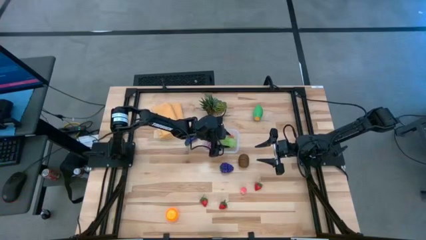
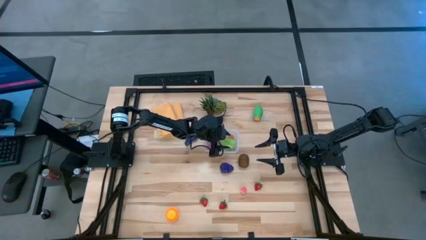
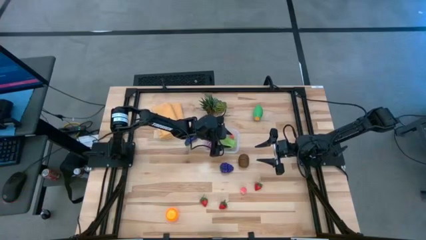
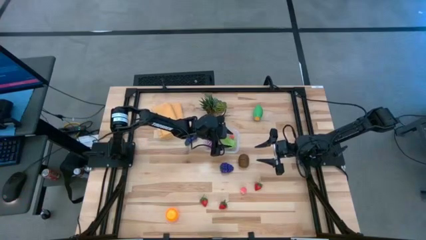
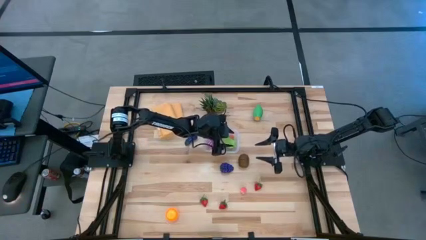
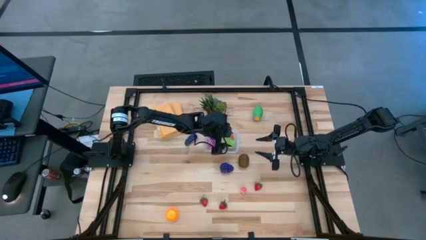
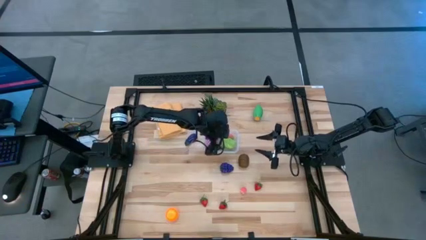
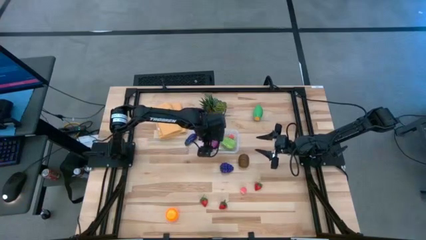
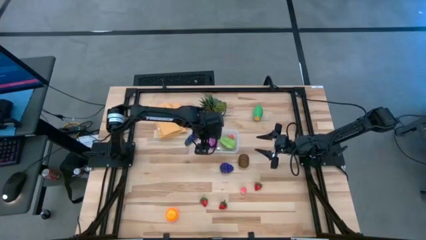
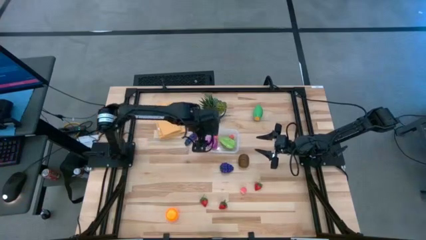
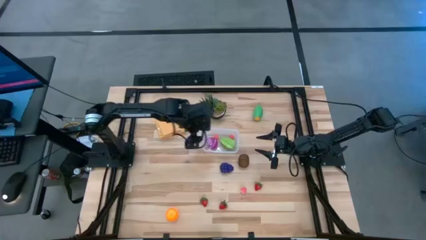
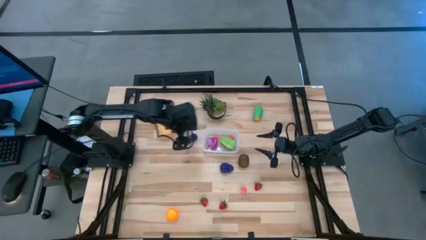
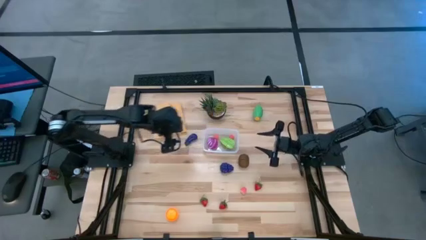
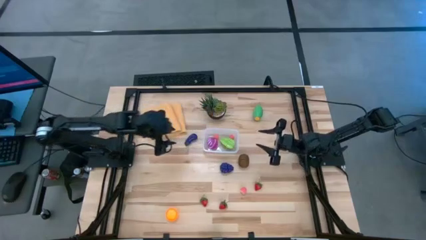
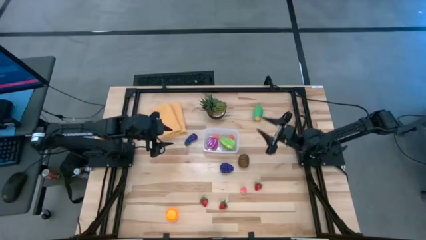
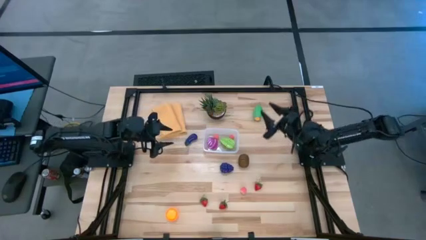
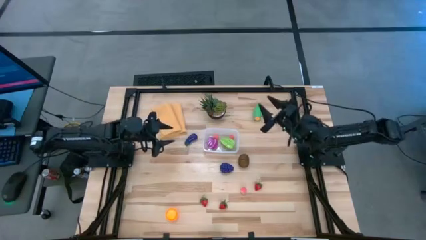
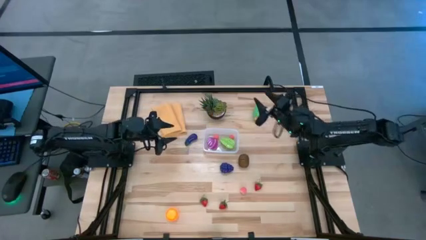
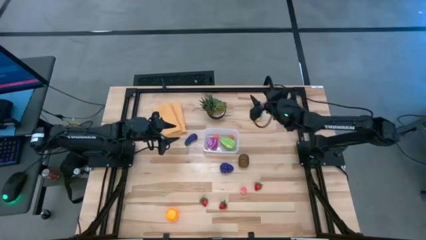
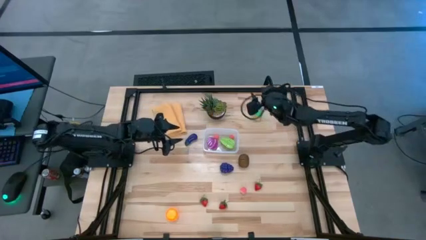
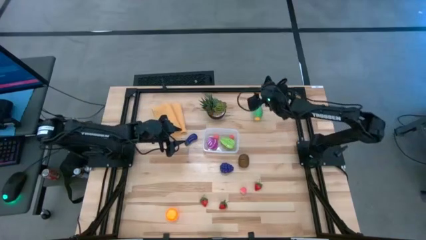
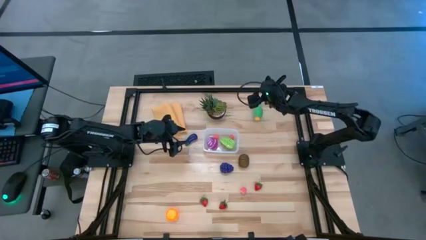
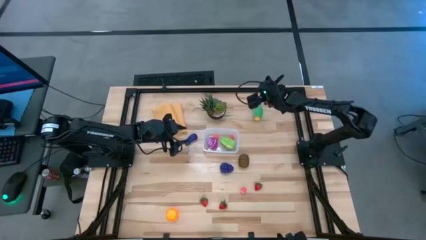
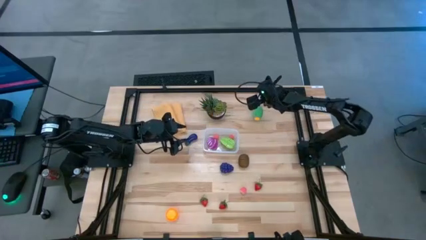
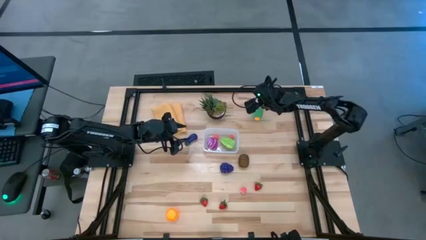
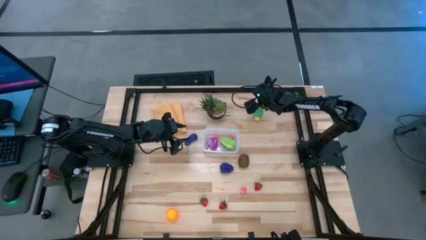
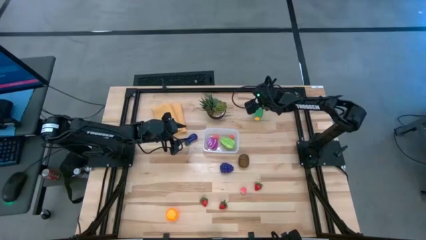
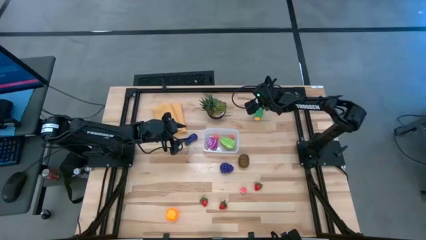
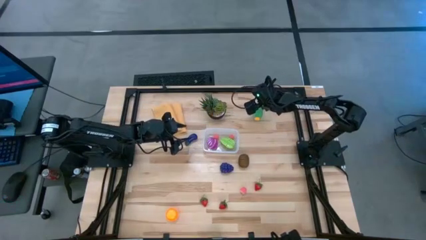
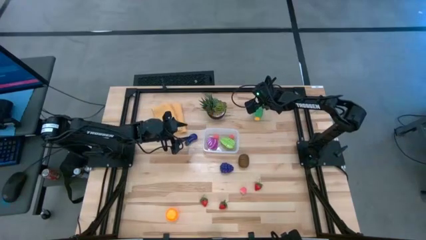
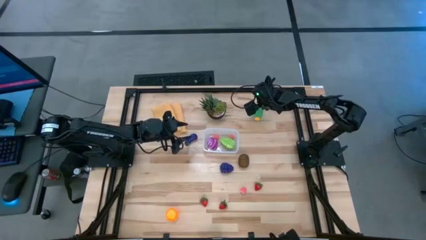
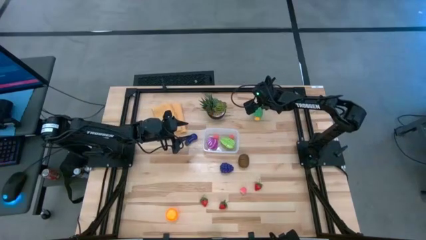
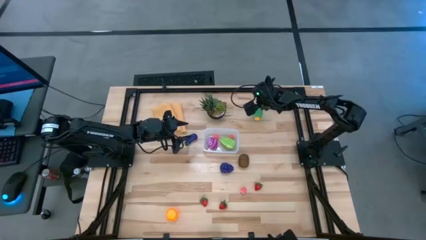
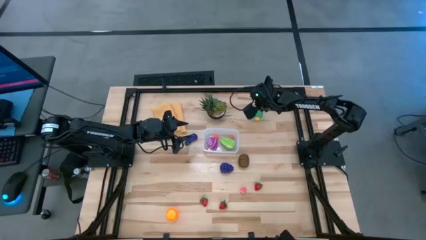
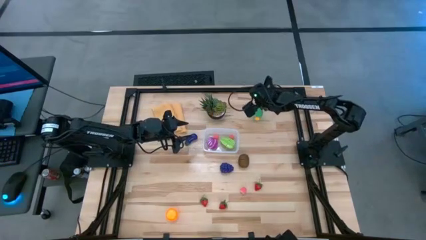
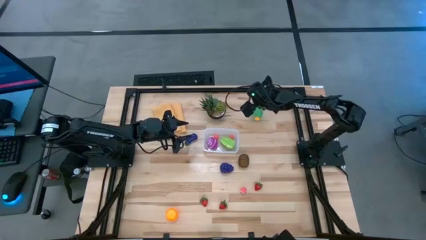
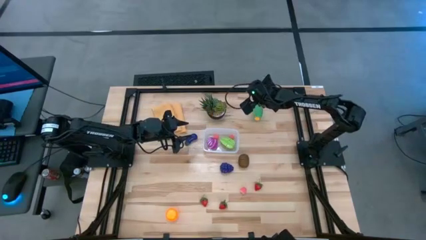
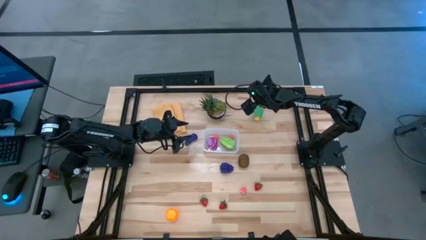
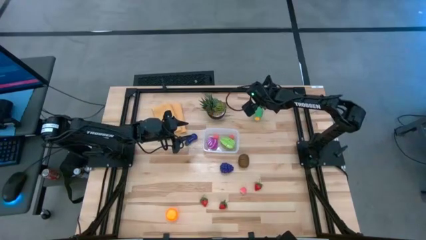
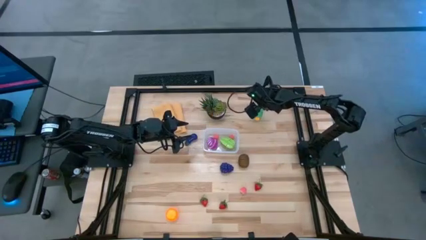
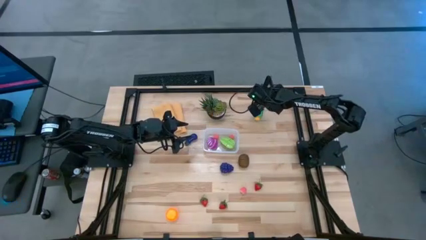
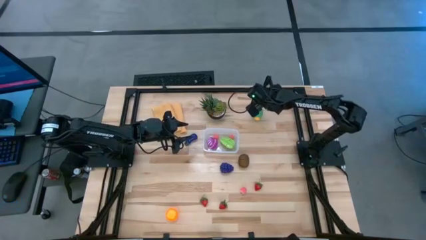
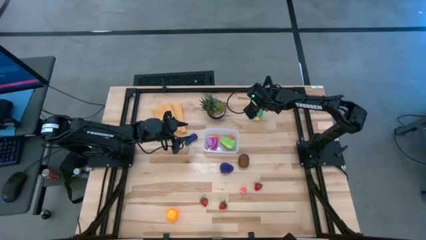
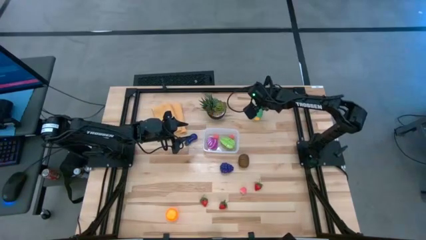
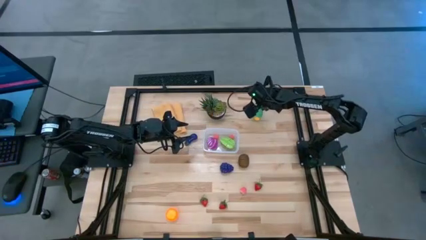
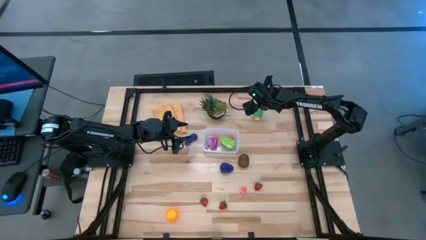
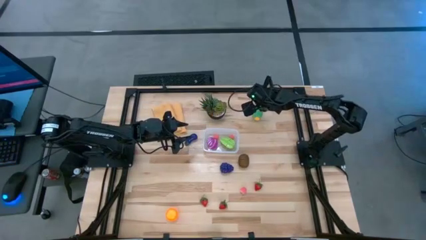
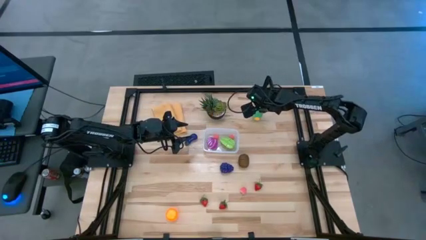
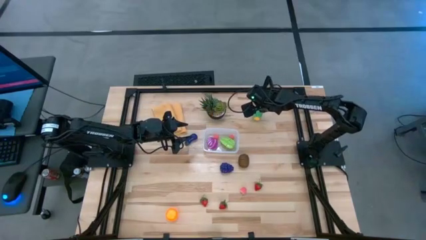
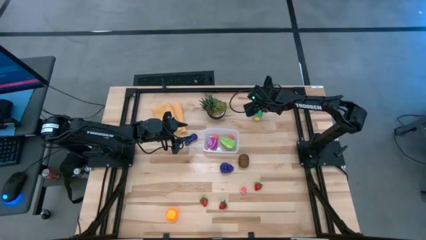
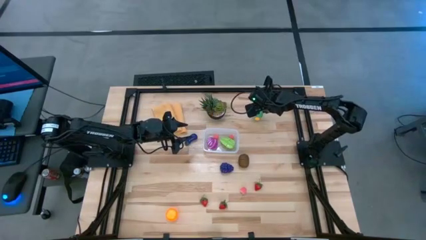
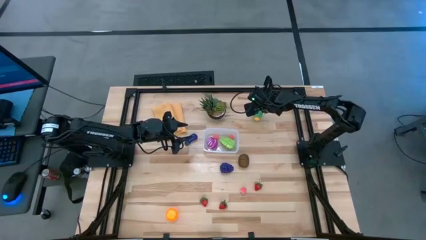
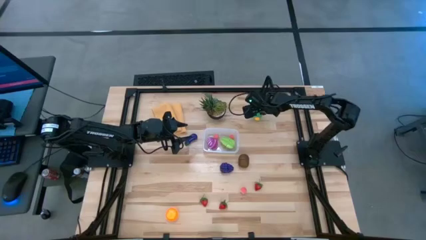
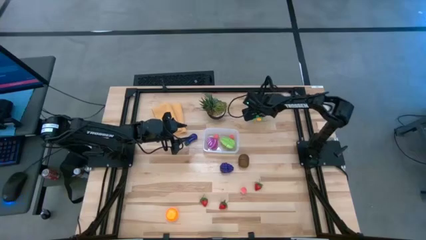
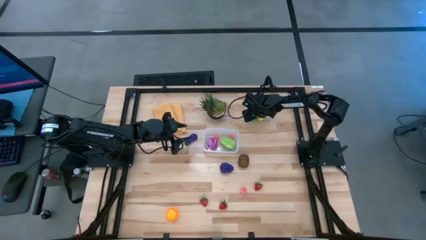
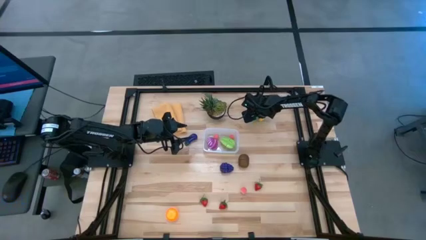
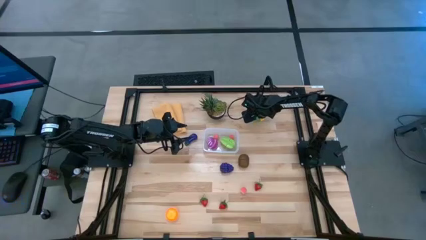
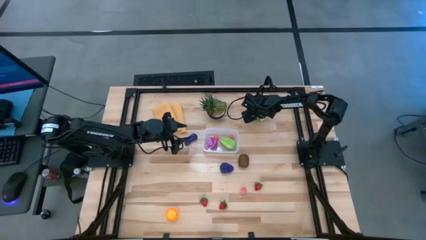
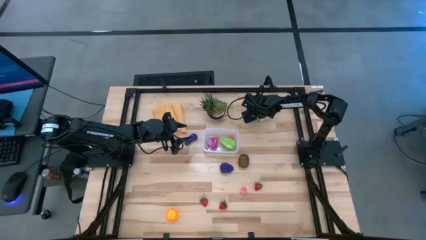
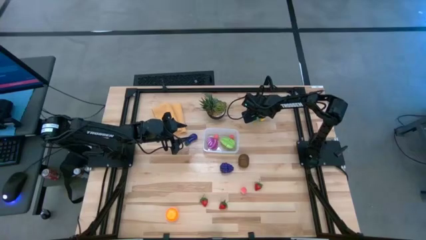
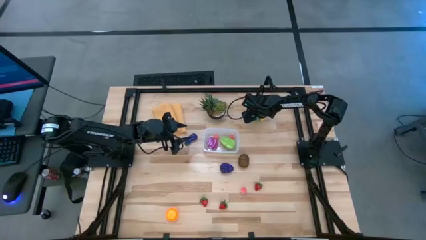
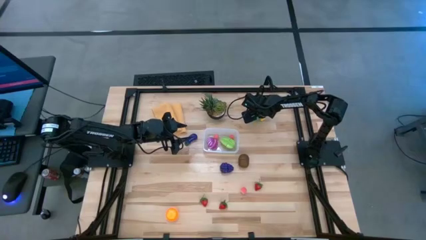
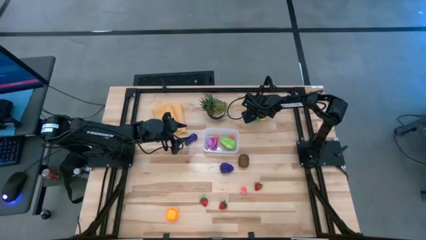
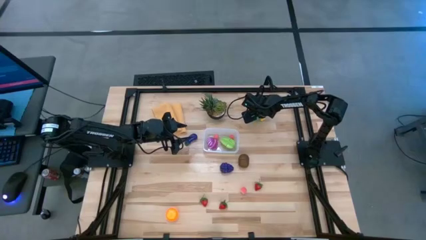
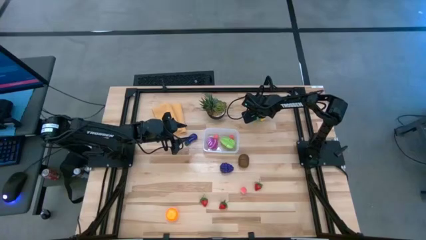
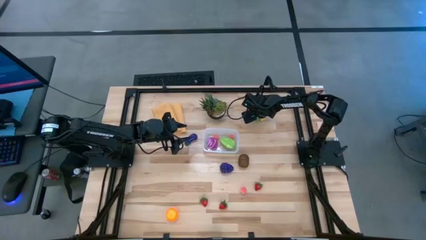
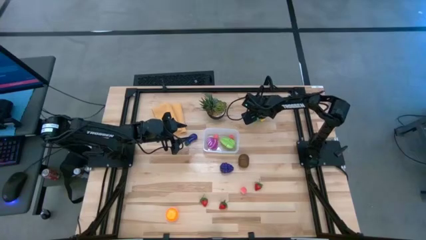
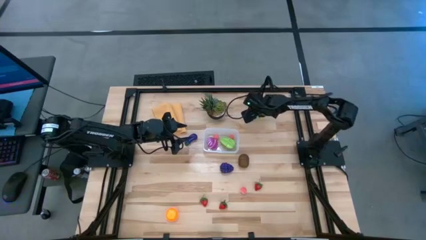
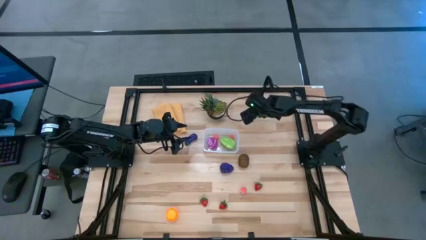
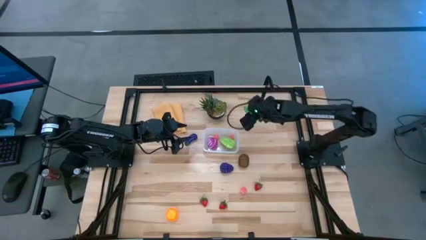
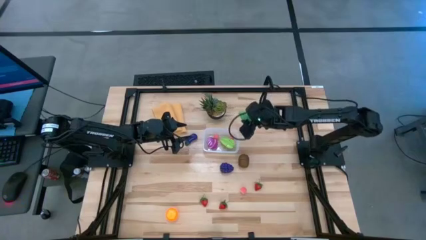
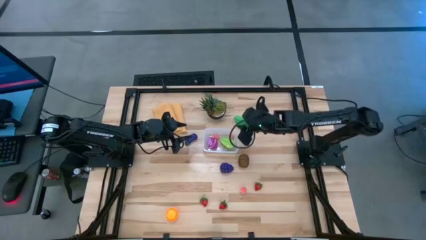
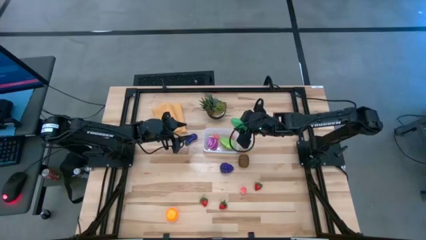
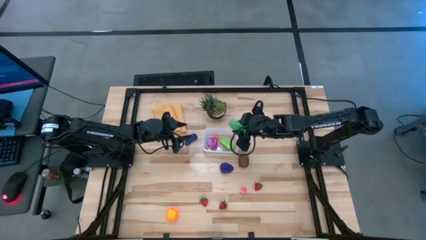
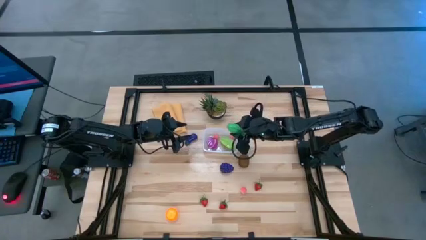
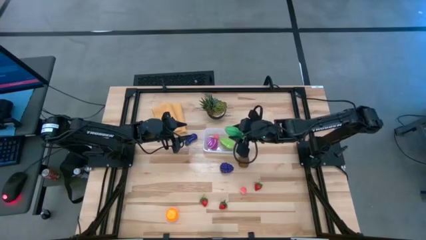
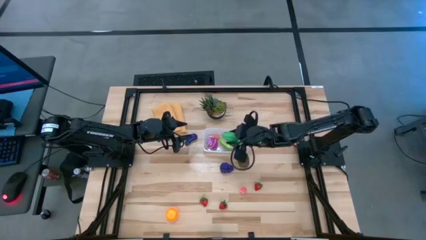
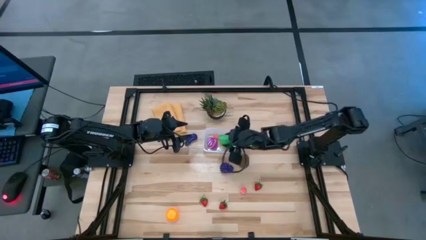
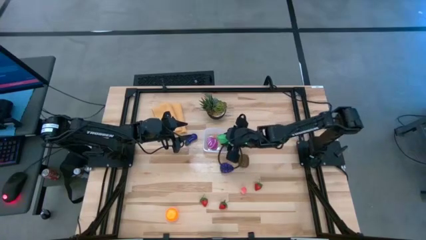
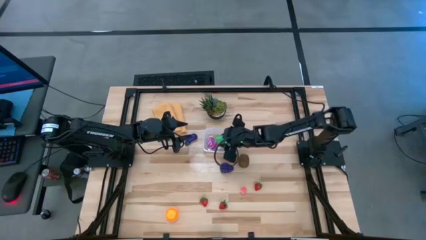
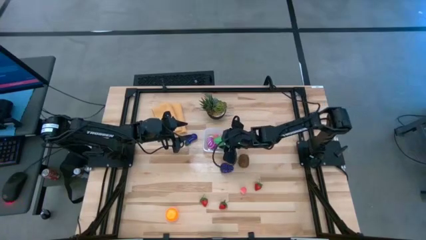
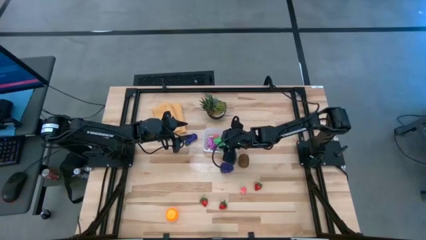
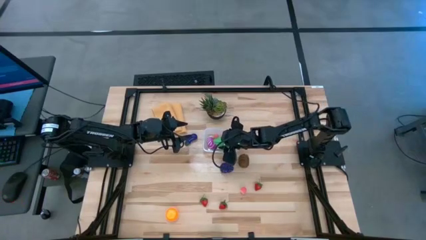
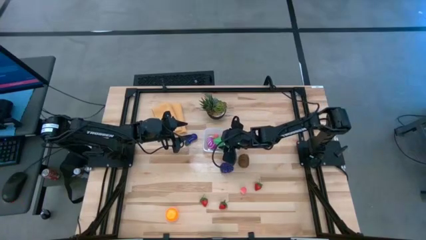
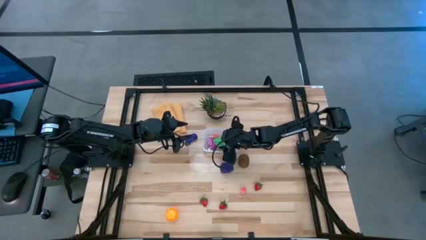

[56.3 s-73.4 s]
Task: Pick and placing Produce into tupperware
Put the green corn into the transparent container
